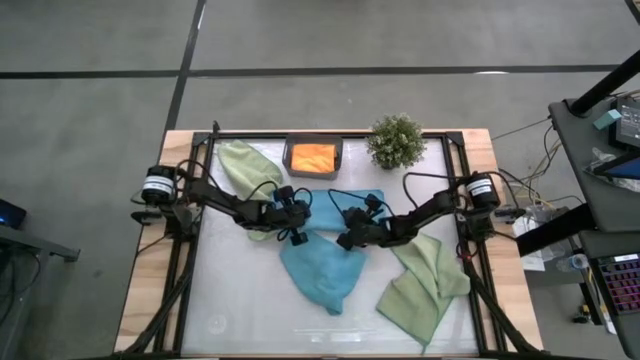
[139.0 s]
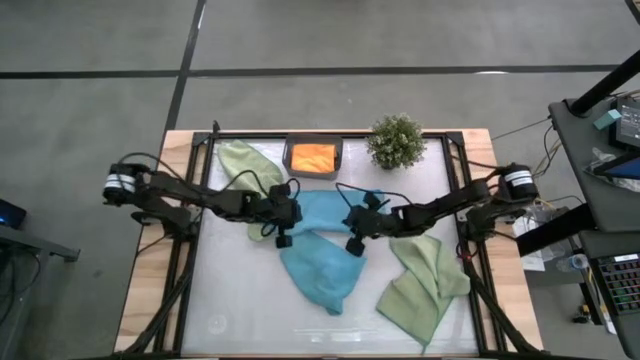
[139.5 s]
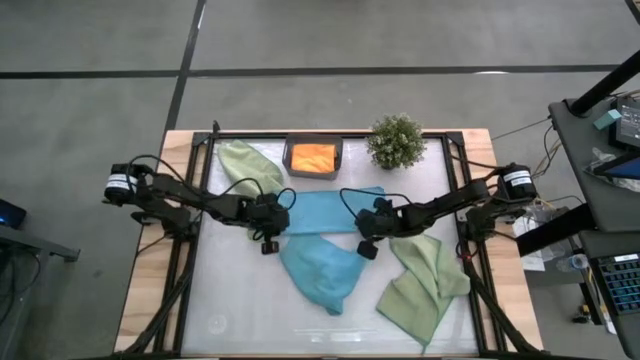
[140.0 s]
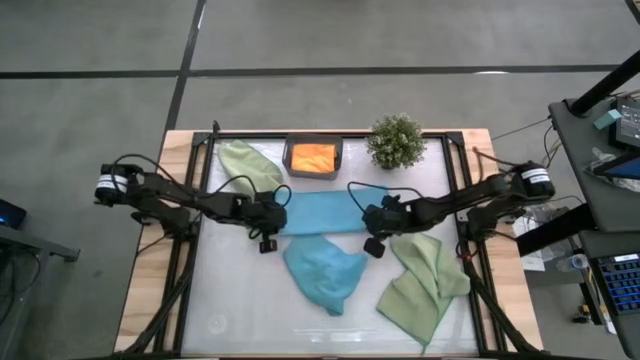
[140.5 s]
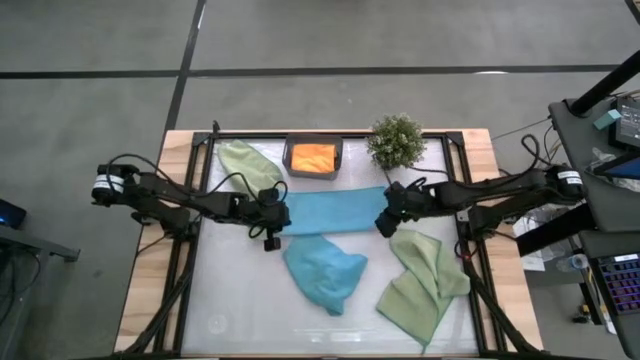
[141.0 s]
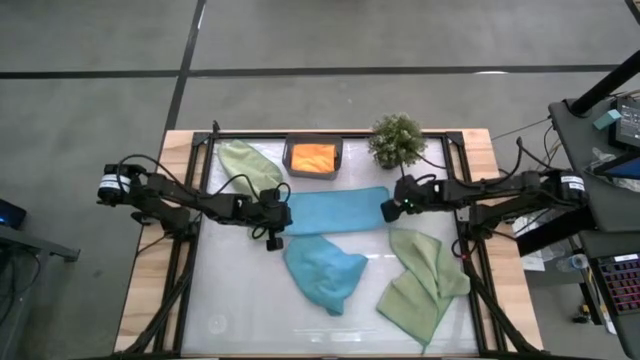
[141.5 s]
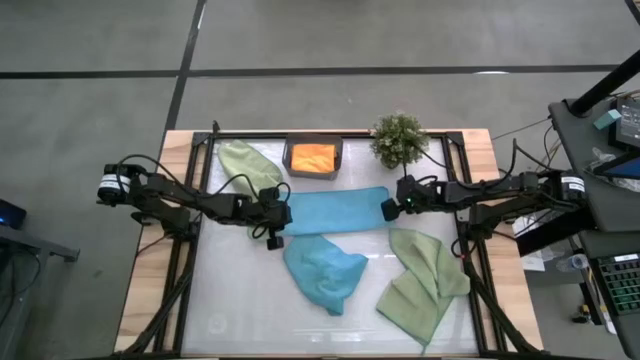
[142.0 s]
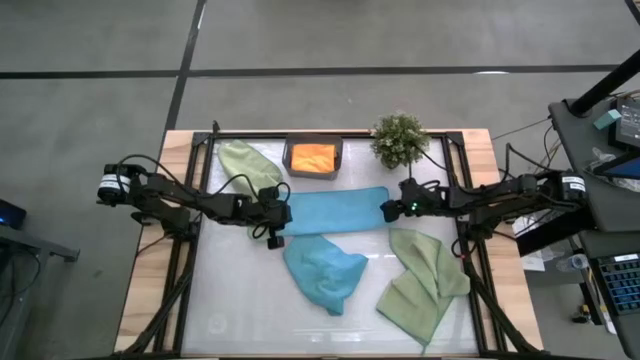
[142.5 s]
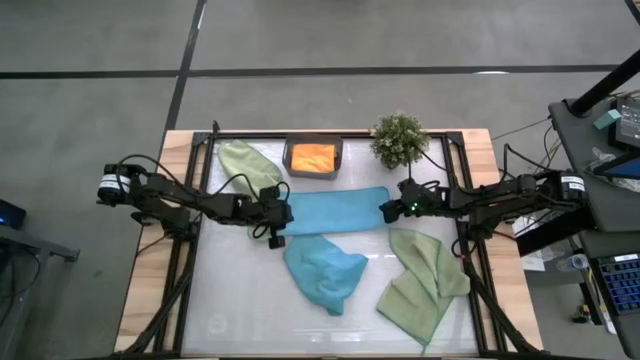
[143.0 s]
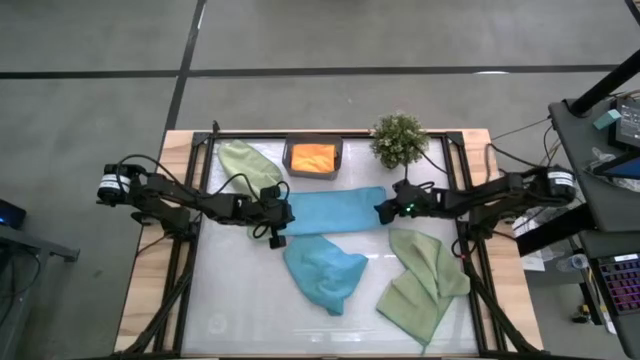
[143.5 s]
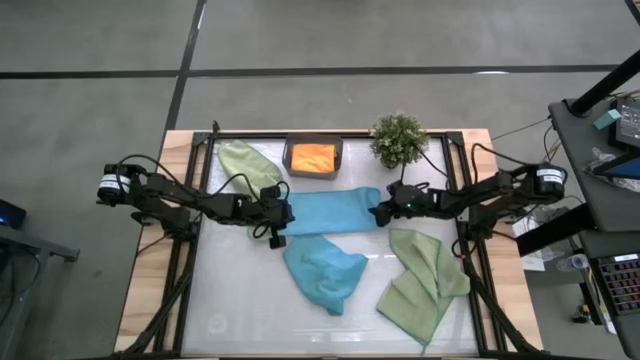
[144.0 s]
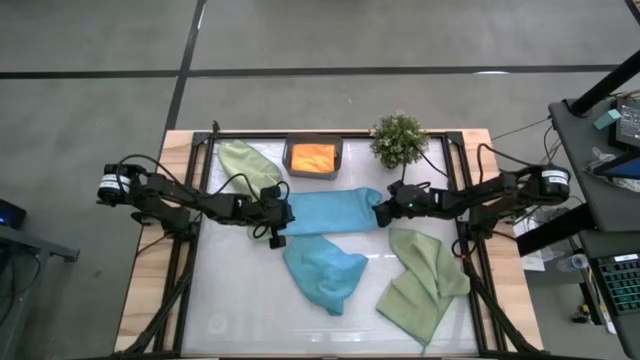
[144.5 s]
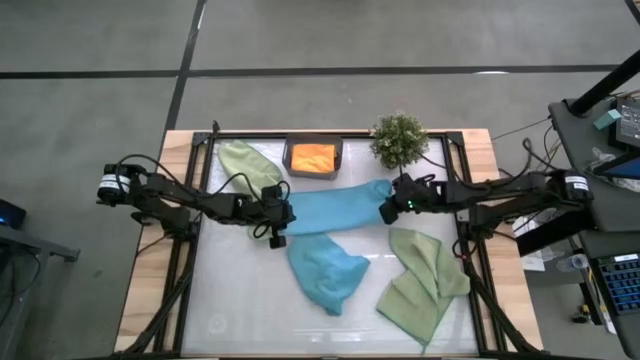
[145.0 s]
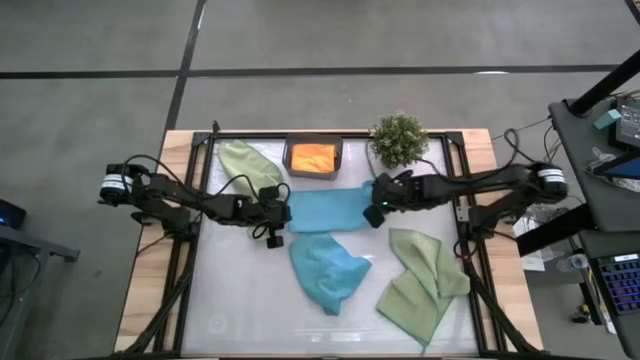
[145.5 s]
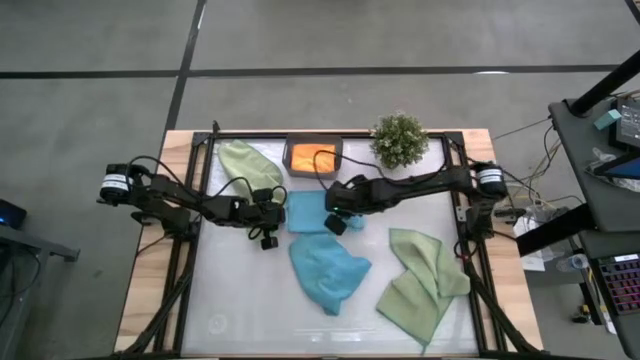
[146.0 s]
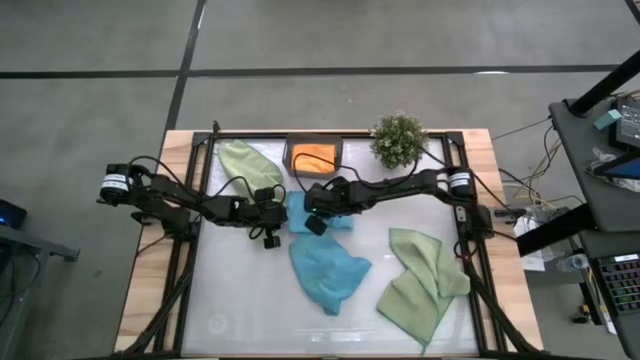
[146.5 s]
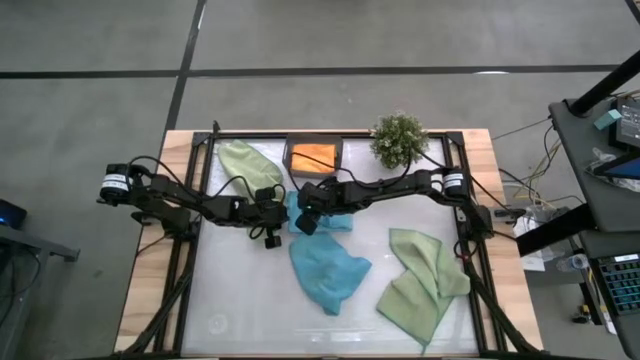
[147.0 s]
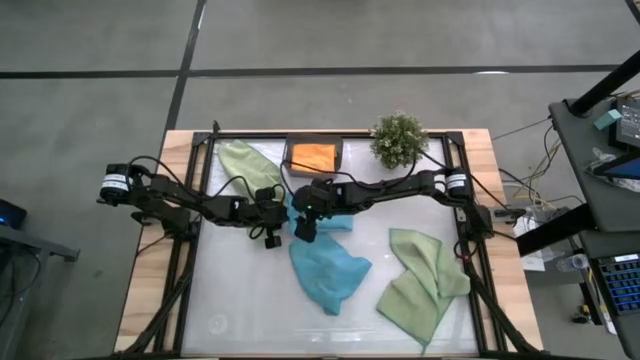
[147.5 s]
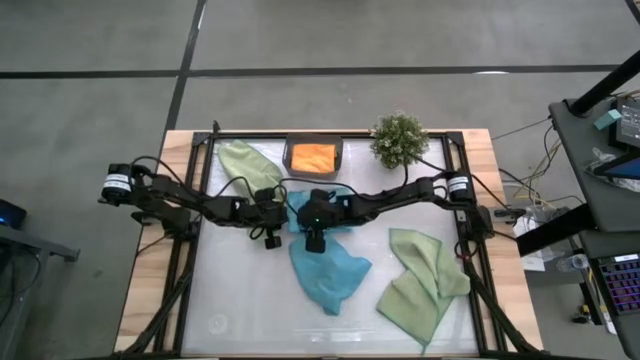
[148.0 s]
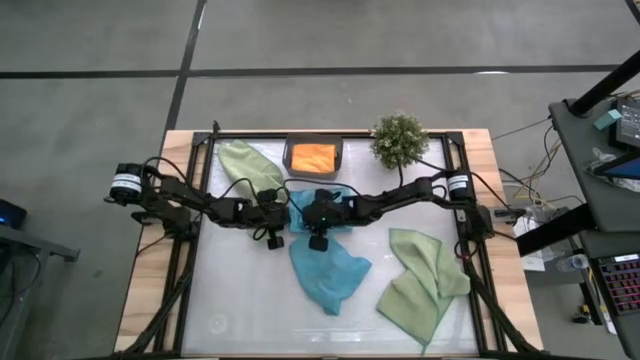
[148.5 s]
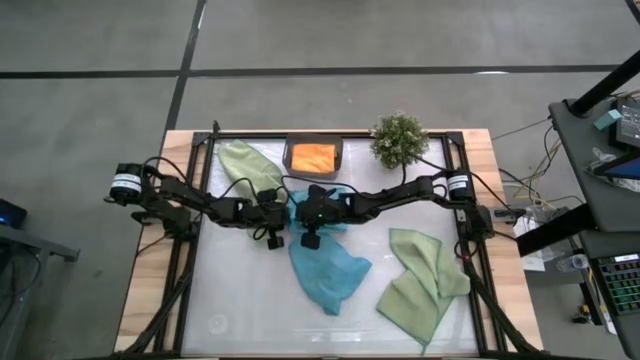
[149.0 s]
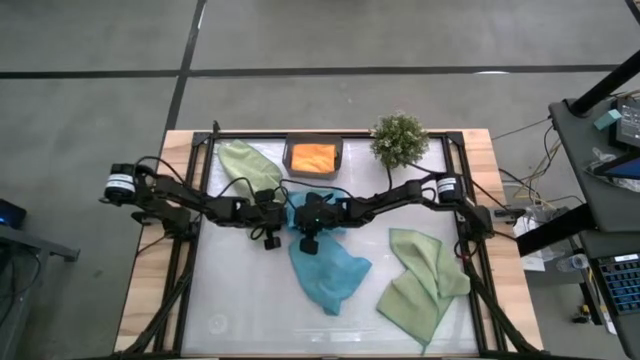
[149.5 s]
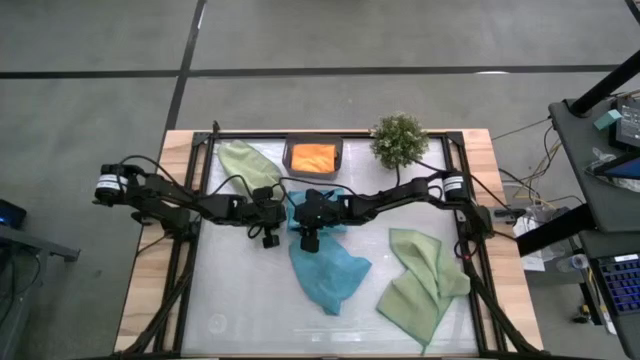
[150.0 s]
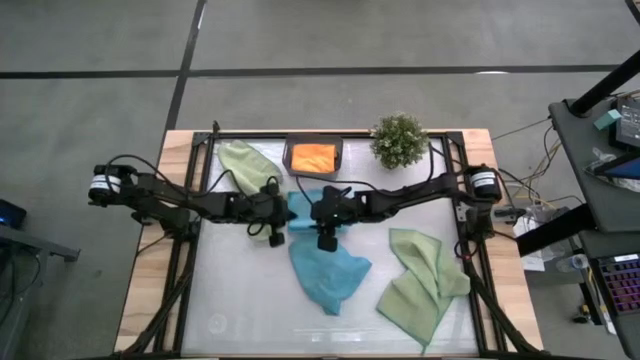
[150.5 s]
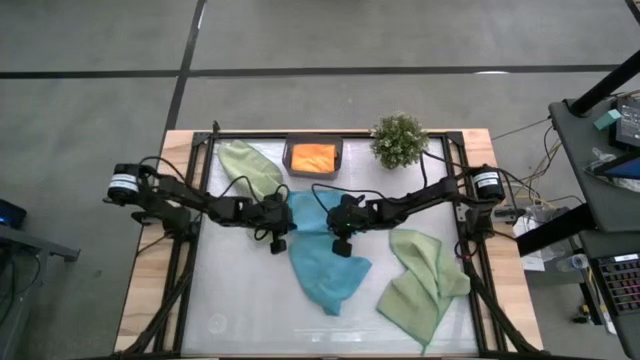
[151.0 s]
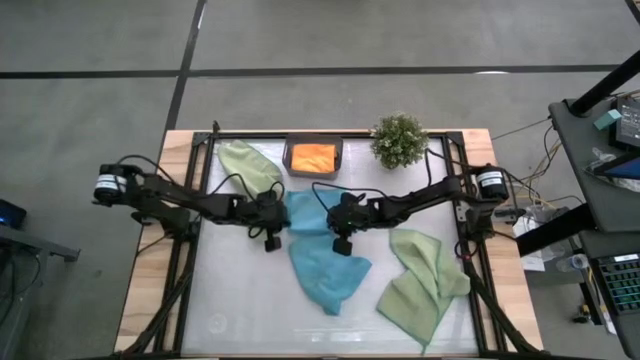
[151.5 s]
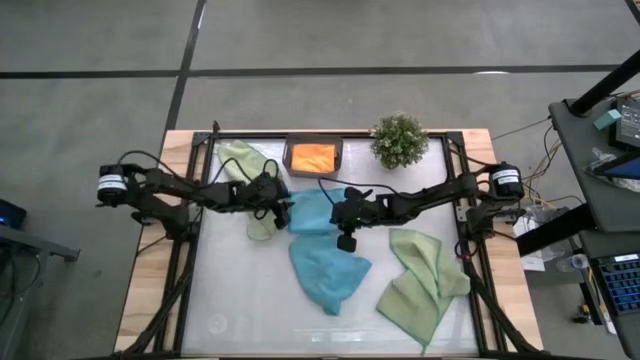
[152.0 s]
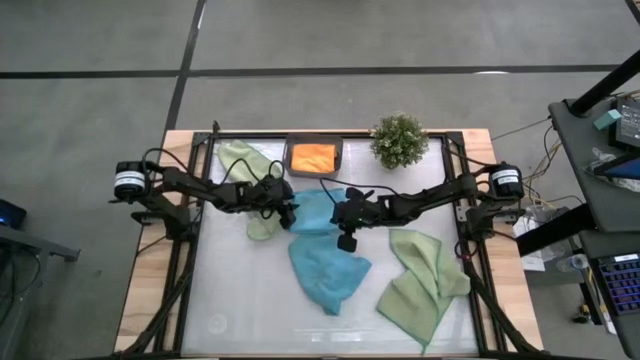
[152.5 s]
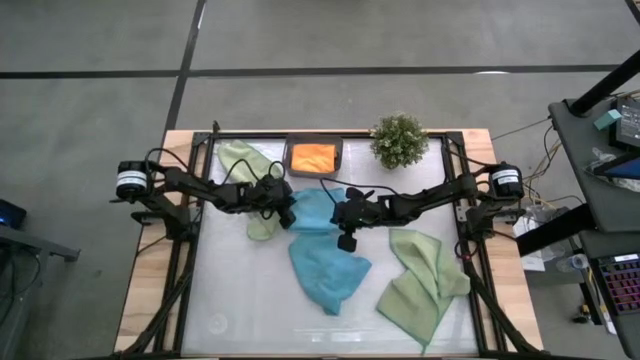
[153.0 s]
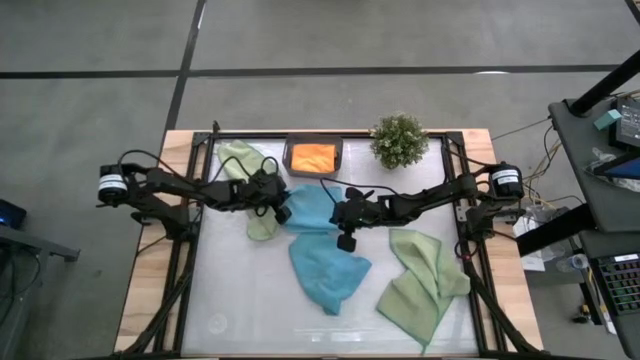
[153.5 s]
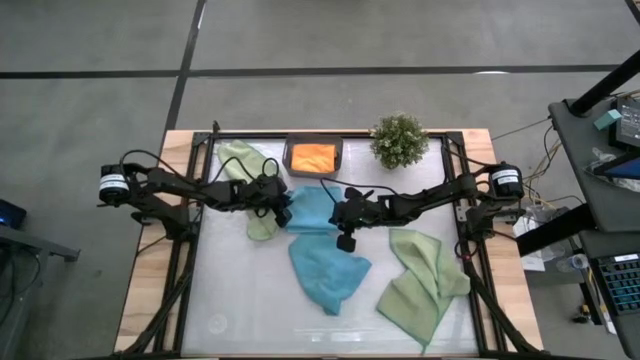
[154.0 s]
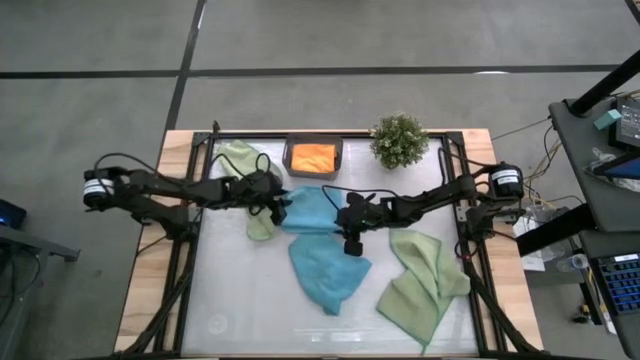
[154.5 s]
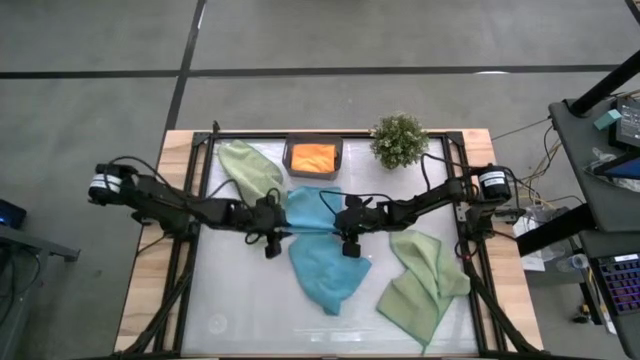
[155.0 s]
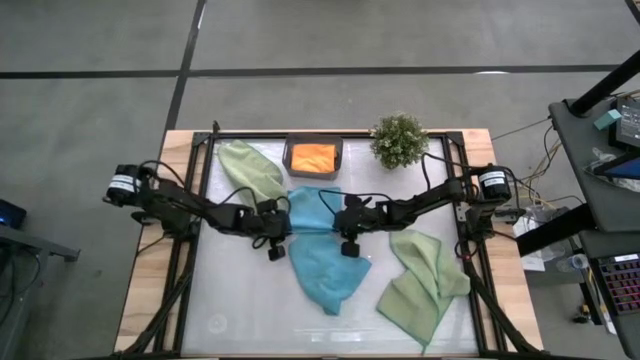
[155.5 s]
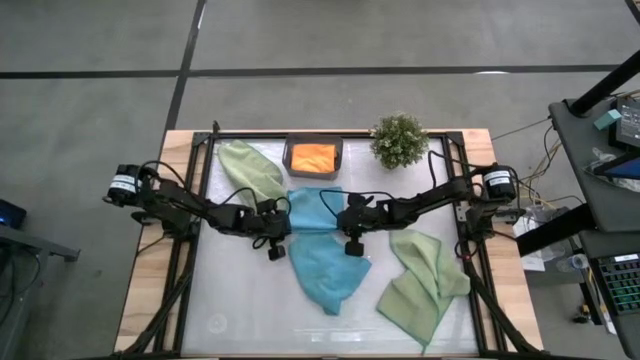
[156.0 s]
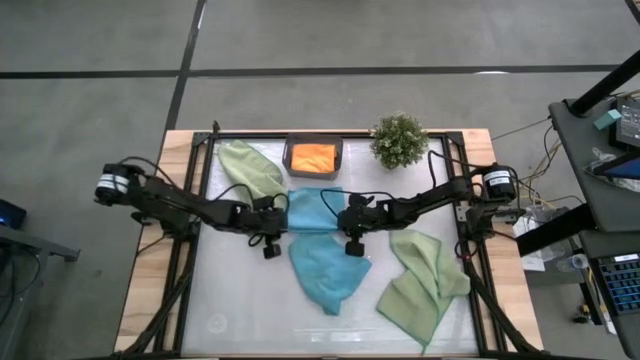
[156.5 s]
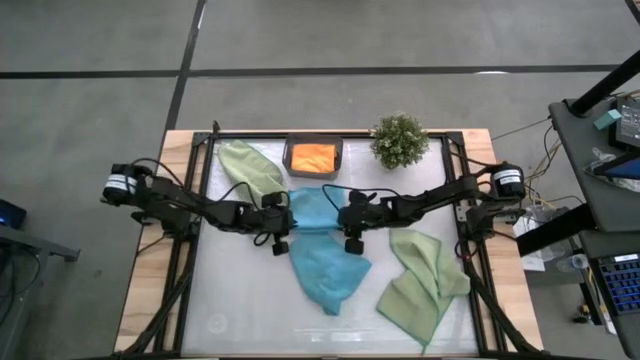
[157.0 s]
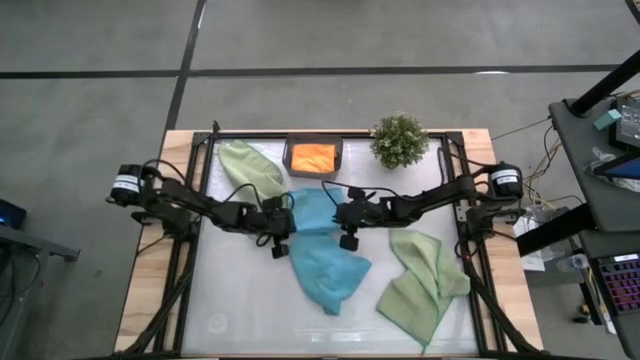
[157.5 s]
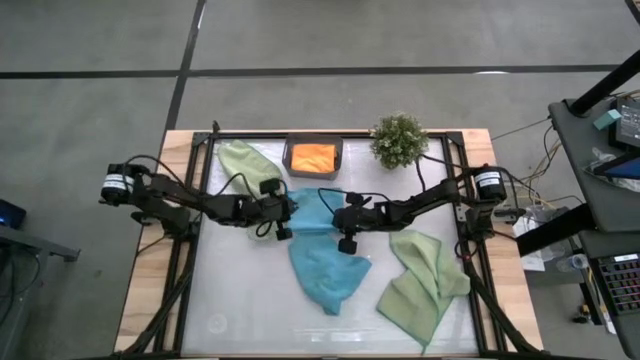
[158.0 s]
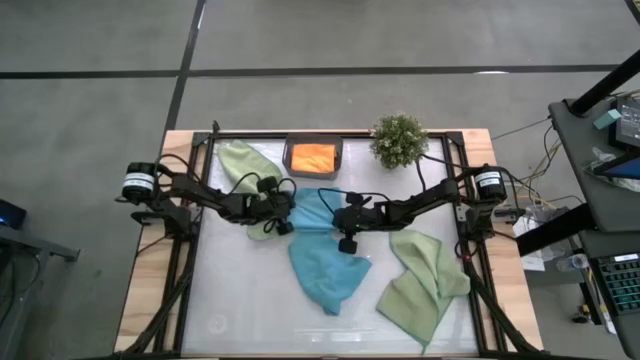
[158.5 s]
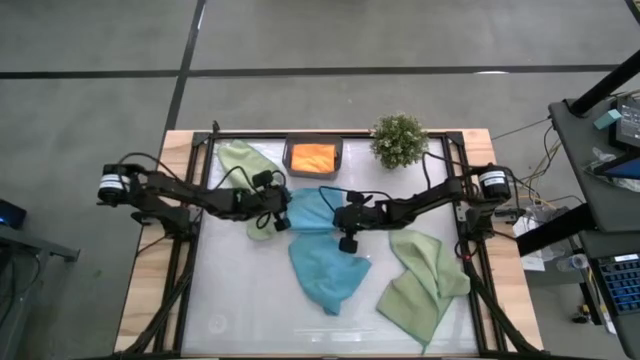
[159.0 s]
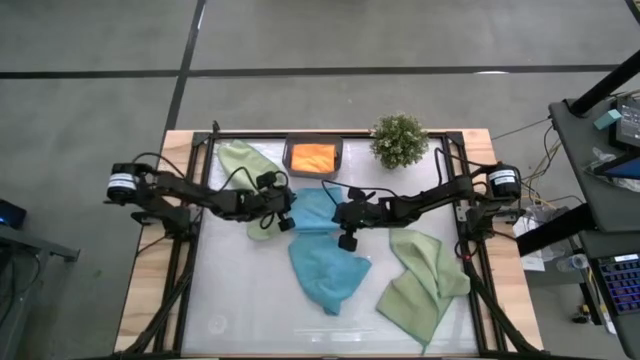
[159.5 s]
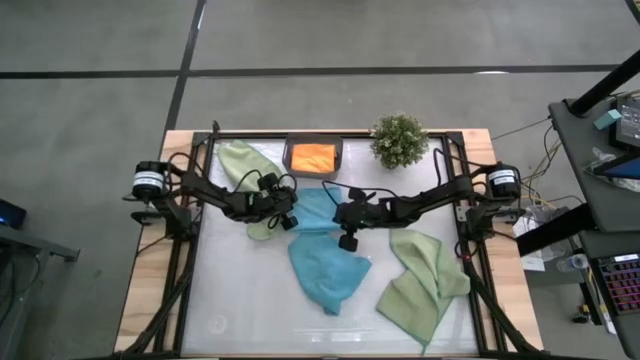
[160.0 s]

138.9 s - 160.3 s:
Task: Fold microfiber towels
Fold the left blue microfiber towel
